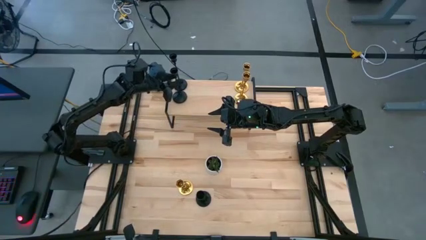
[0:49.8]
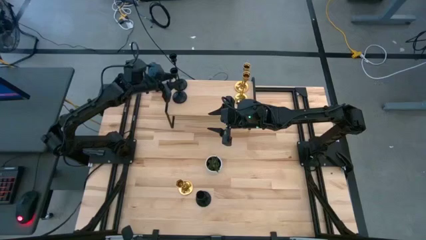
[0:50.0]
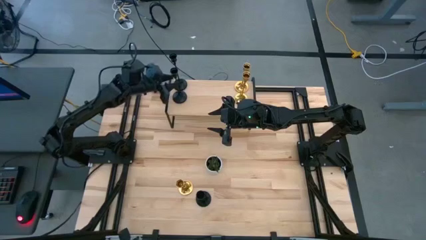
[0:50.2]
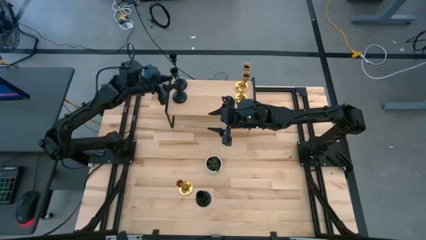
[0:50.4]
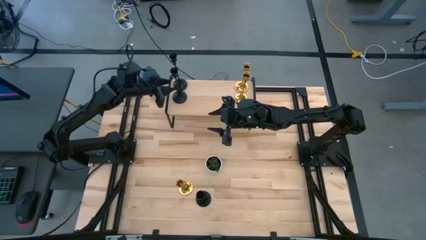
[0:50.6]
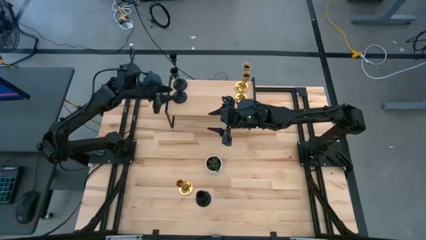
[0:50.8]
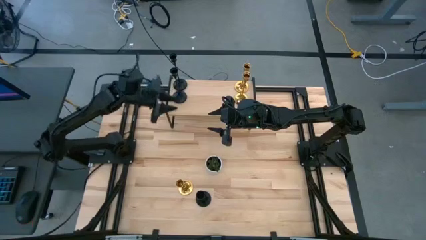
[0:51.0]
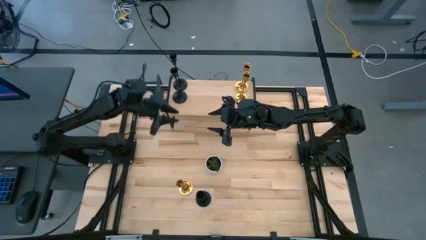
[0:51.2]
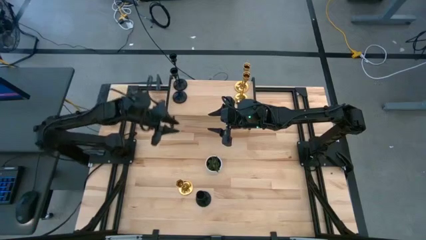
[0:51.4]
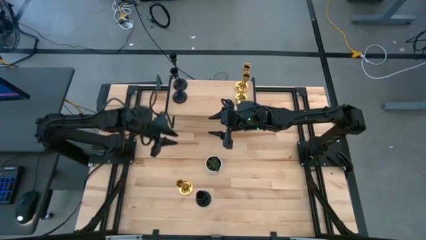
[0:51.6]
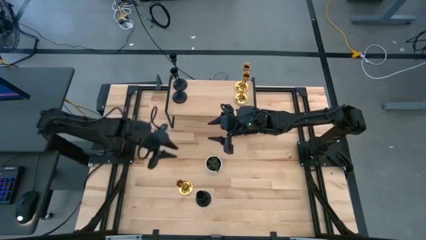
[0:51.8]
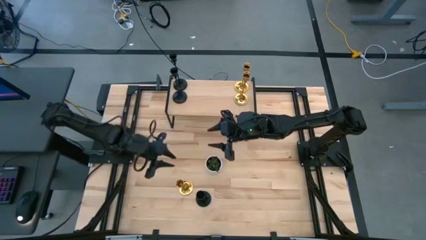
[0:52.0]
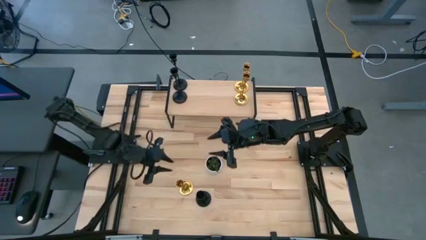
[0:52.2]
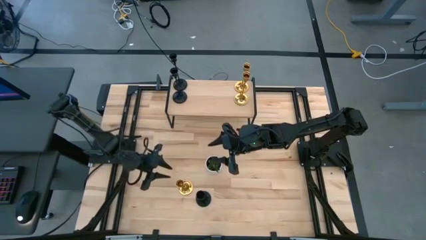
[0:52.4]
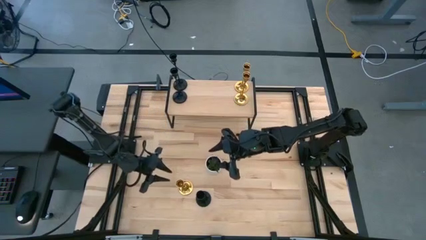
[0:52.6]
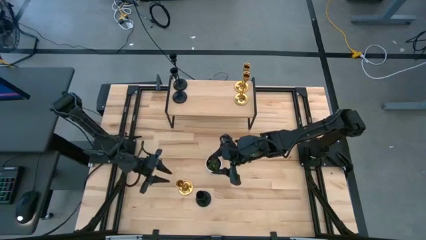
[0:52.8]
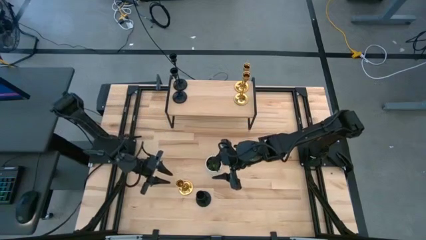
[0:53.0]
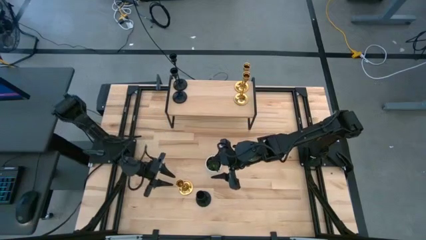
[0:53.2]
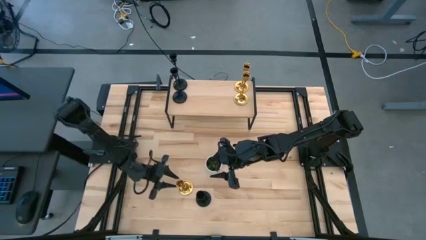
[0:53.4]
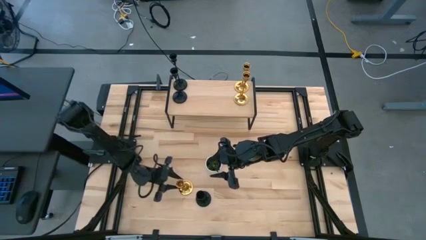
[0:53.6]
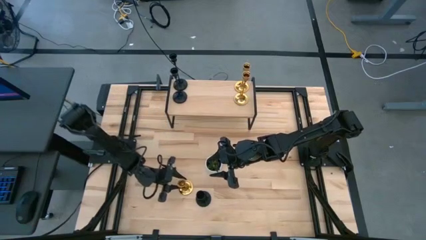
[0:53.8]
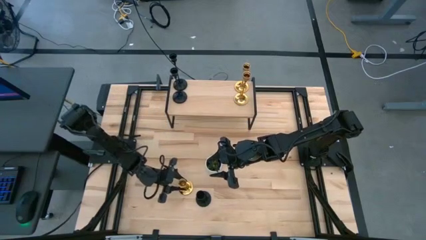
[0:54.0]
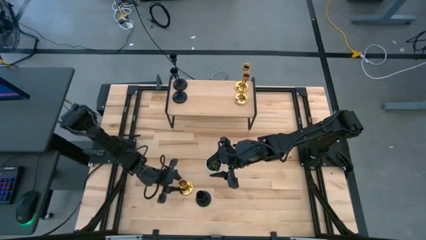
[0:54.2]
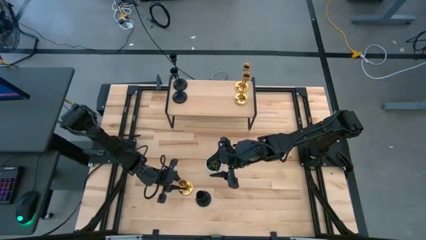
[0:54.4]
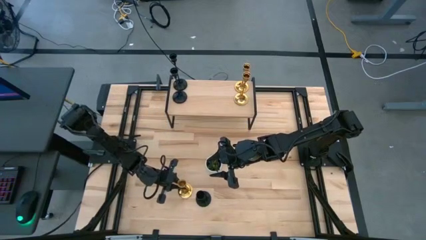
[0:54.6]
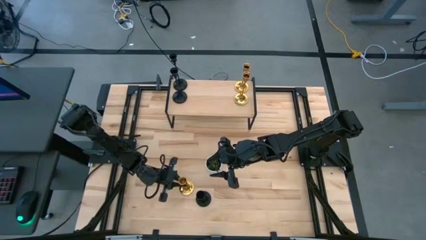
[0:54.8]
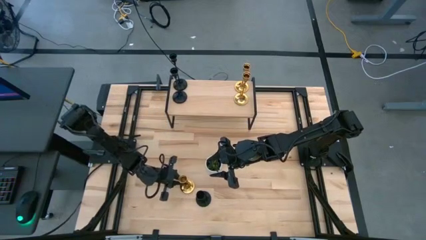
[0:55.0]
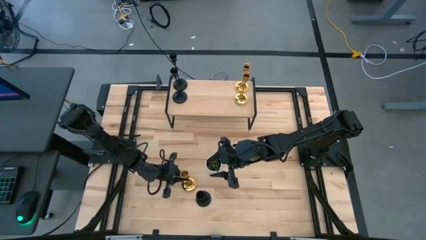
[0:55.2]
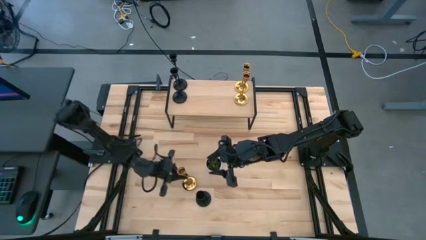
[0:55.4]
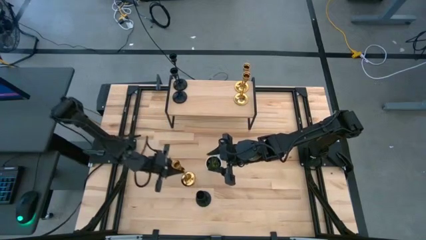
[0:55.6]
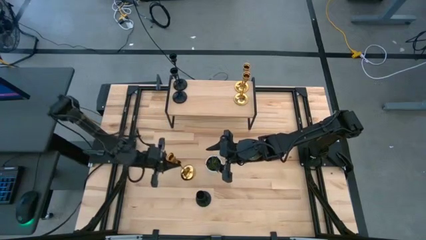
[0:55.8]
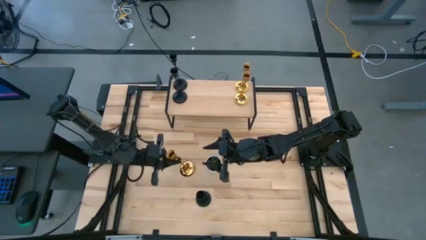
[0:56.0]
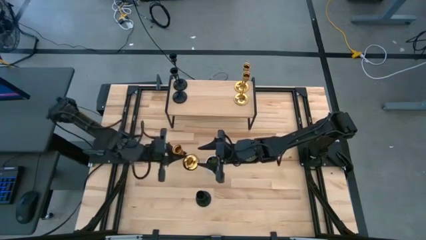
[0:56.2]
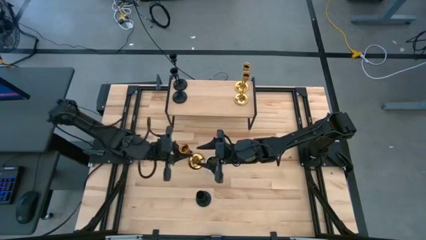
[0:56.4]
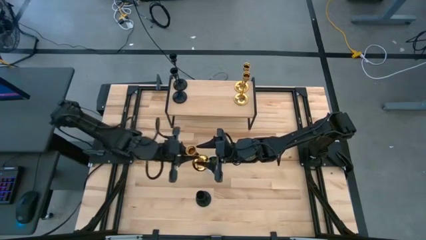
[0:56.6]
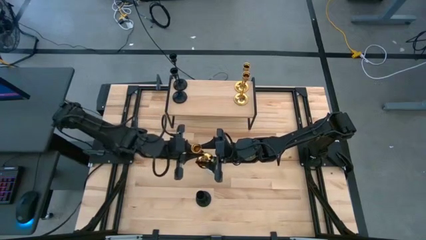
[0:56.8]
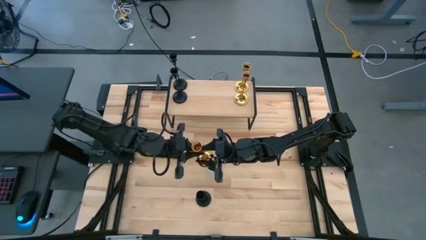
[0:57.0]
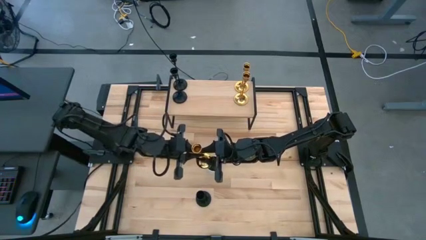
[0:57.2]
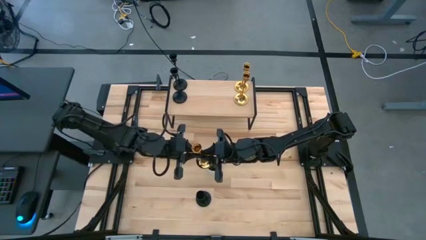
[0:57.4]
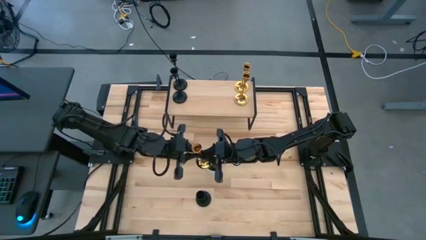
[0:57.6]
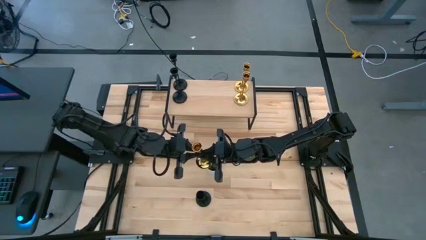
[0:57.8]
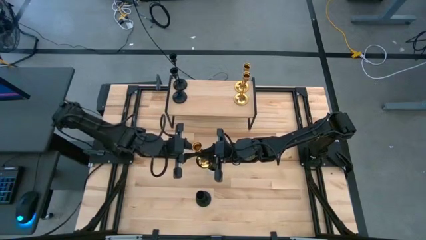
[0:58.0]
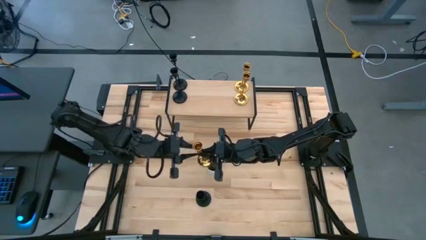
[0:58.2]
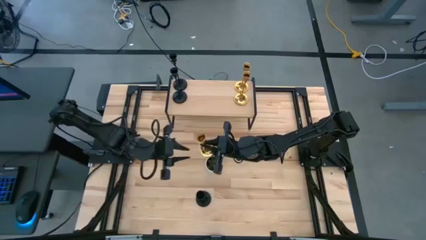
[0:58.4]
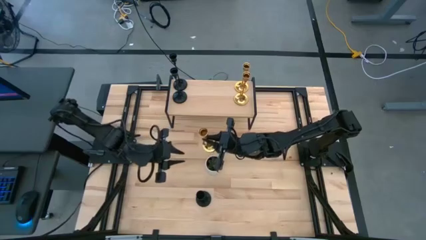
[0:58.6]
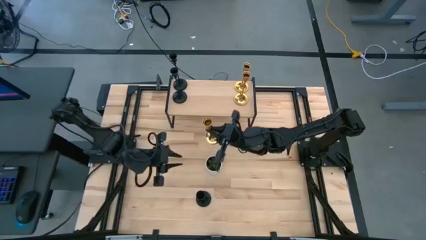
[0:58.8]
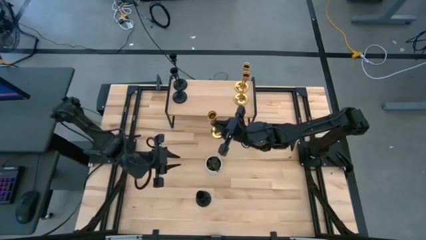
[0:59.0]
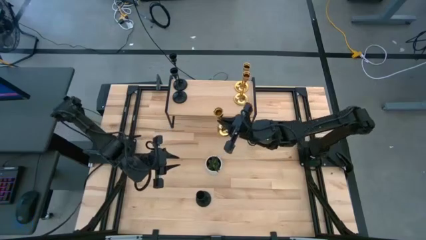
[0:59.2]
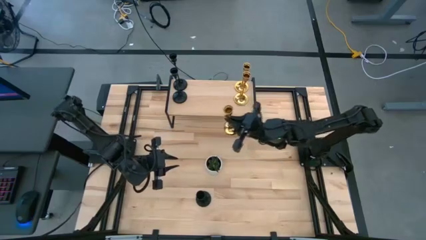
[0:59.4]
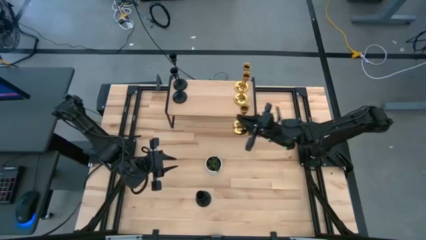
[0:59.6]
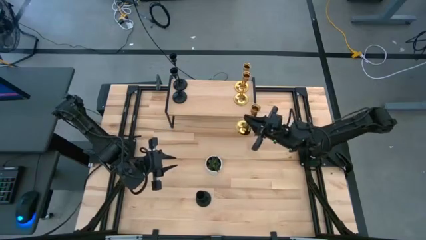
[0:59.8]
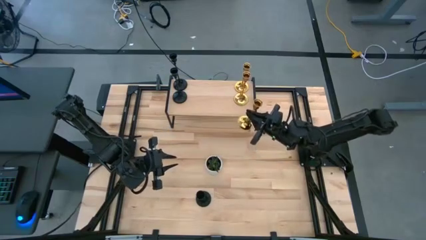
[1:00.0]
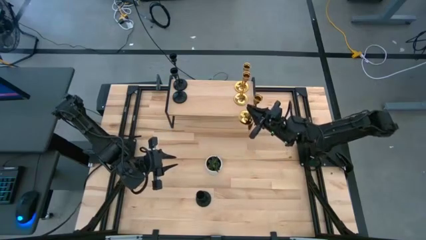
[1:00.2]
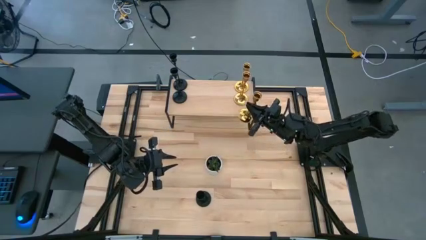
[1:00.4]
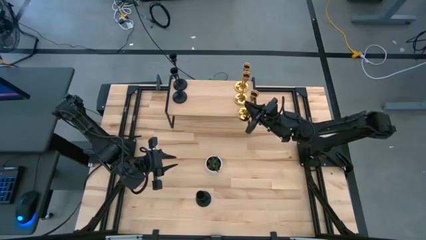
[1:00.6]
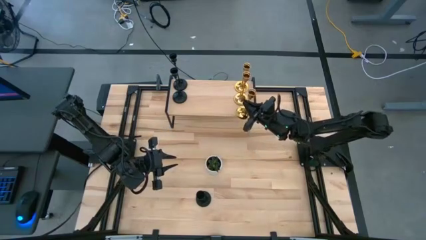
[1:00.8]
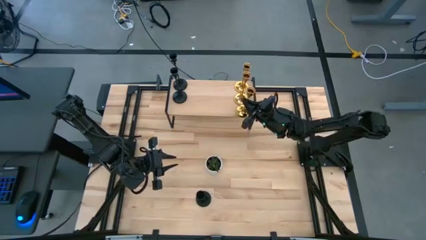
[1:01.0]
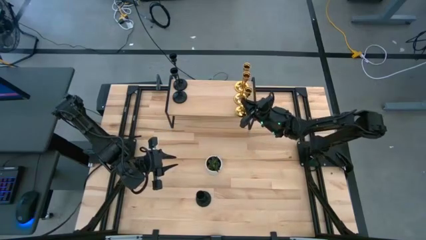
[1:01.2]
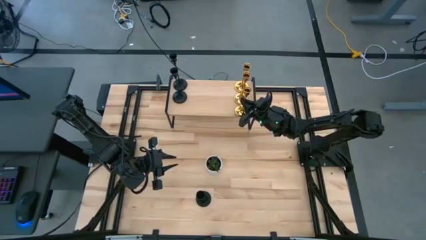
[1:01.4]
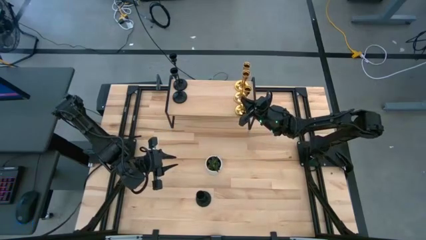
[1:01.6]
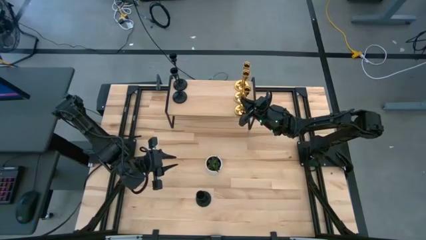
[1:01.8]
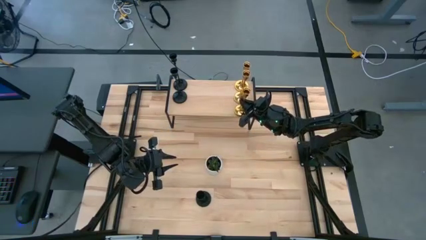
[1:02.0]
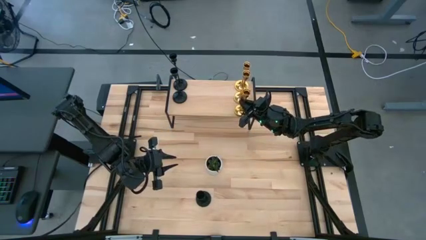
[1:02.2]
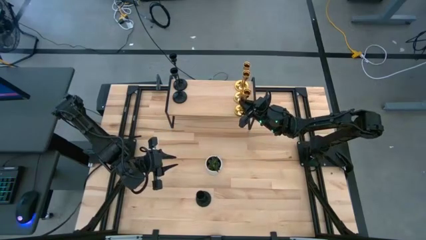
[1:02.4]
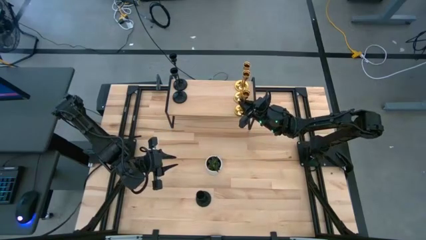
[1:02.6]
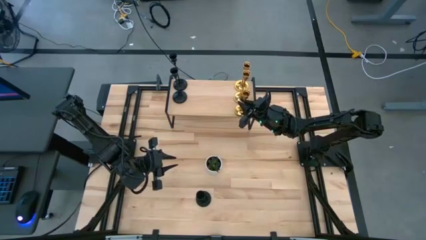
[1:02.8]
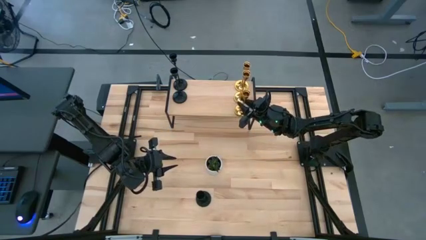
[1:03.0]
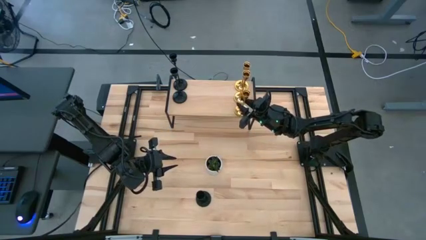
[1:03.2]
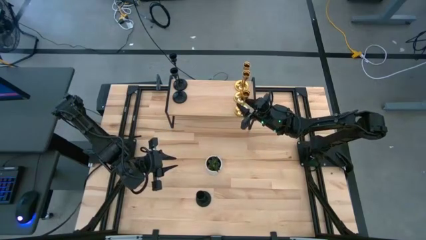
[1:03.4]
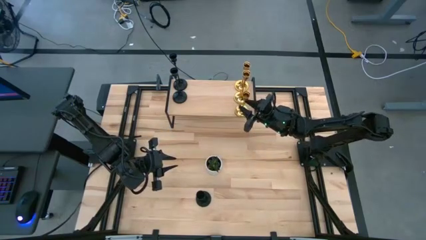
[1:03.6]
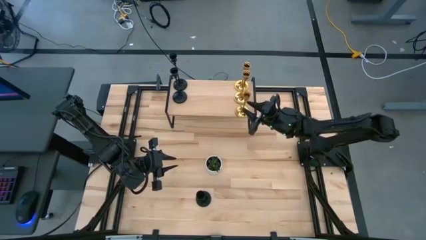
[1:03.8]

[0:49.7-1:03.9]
Task: Pick & Place candle stick holders
Put the golden candle holder on the shelf aligned with the other golden candle holder
